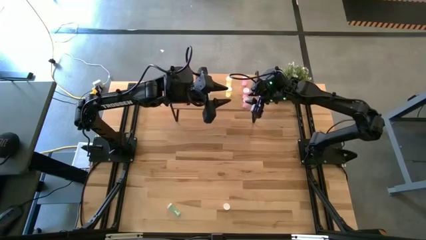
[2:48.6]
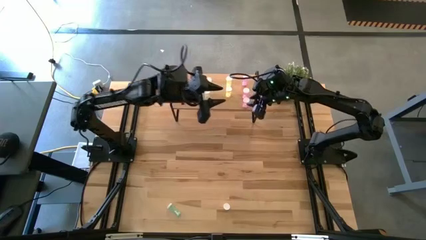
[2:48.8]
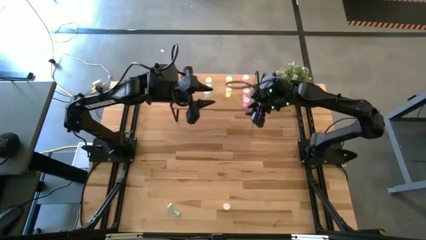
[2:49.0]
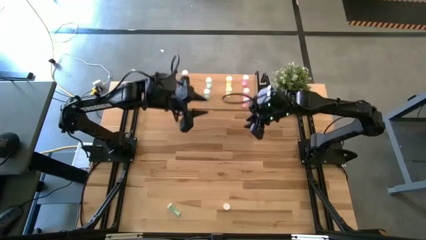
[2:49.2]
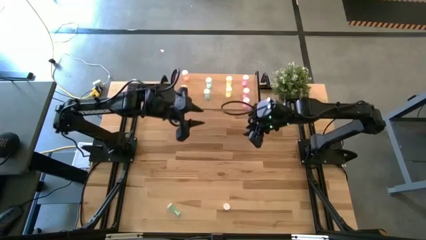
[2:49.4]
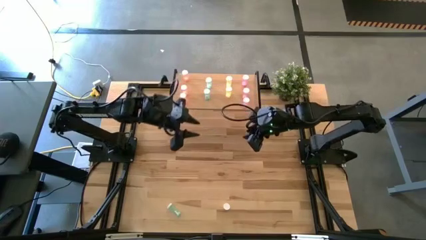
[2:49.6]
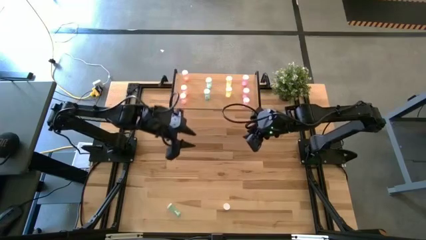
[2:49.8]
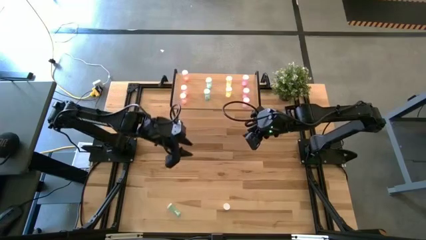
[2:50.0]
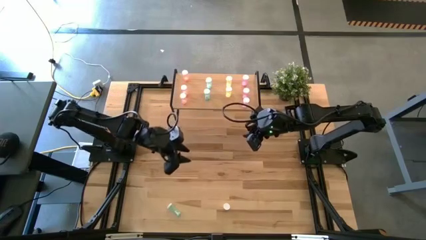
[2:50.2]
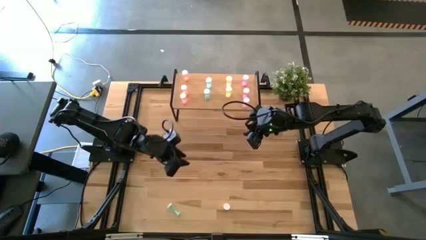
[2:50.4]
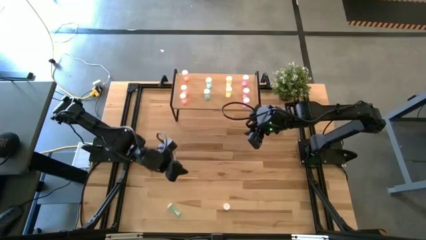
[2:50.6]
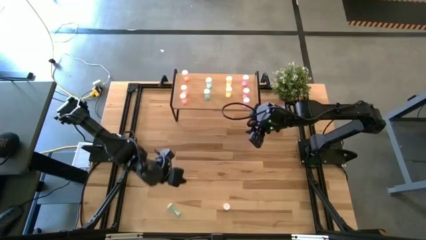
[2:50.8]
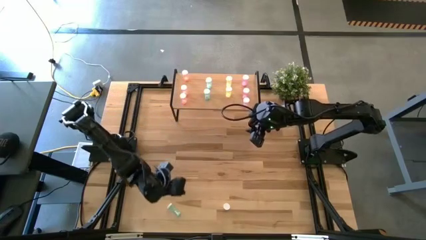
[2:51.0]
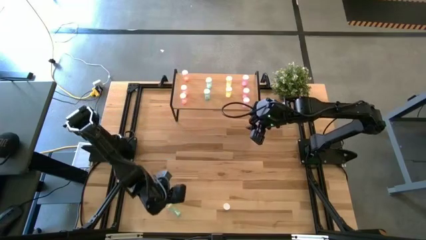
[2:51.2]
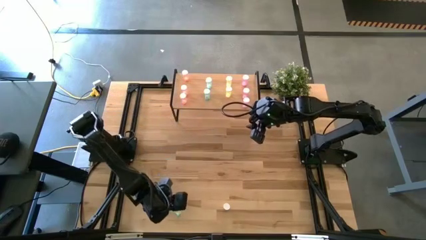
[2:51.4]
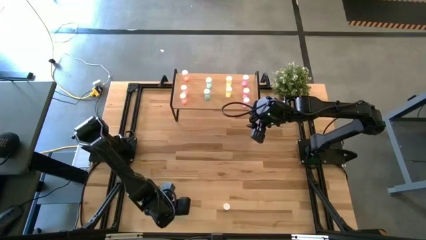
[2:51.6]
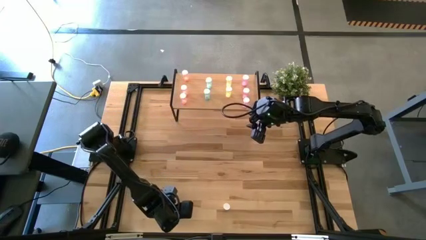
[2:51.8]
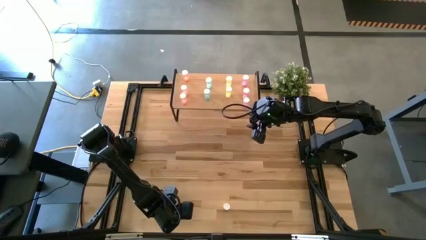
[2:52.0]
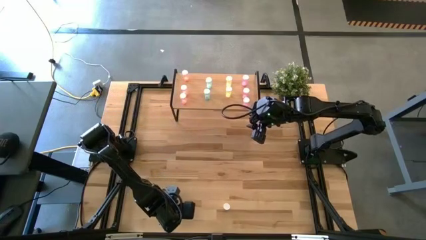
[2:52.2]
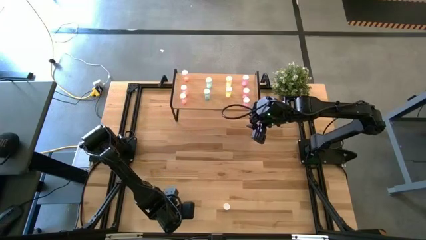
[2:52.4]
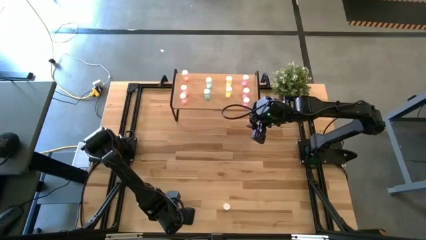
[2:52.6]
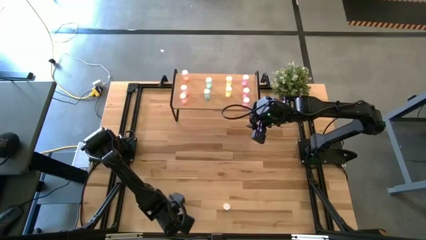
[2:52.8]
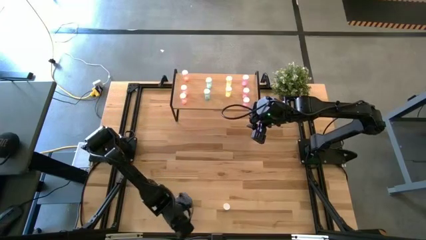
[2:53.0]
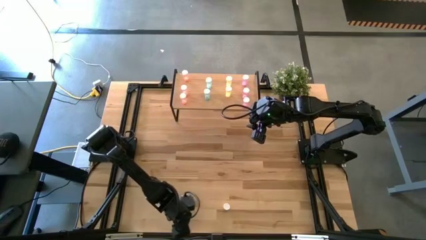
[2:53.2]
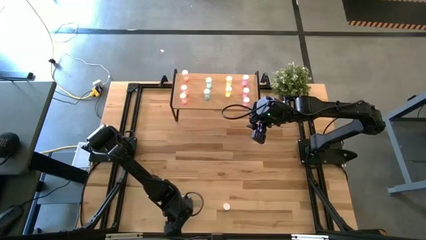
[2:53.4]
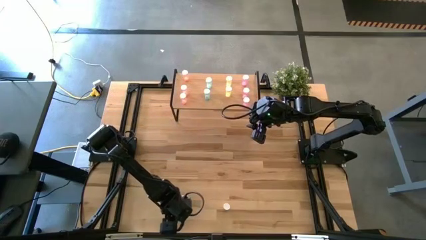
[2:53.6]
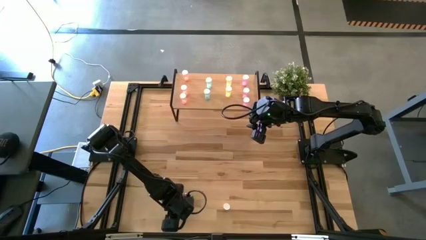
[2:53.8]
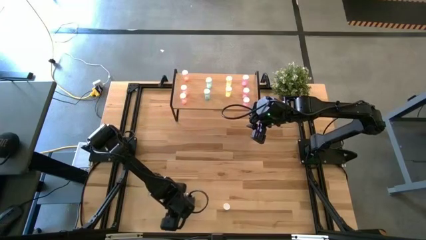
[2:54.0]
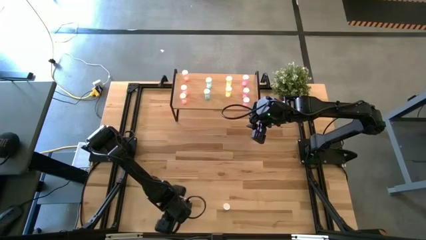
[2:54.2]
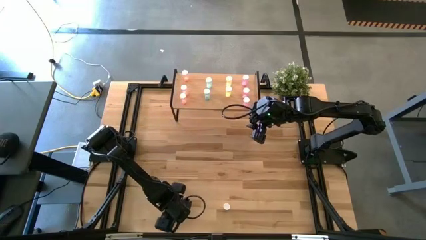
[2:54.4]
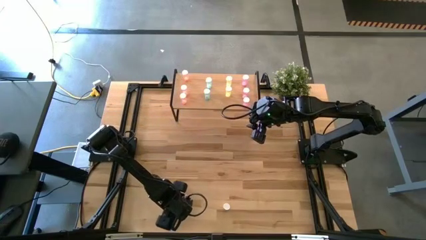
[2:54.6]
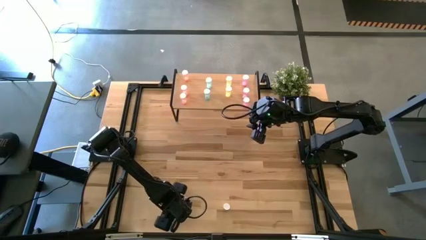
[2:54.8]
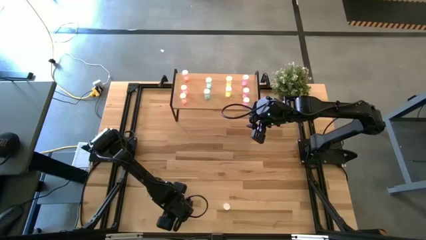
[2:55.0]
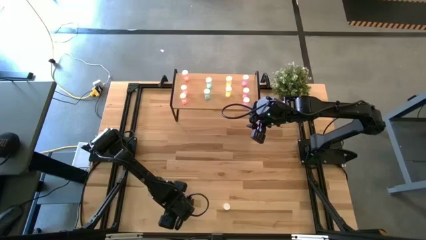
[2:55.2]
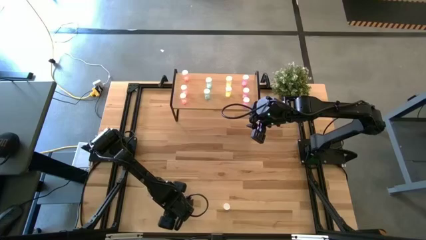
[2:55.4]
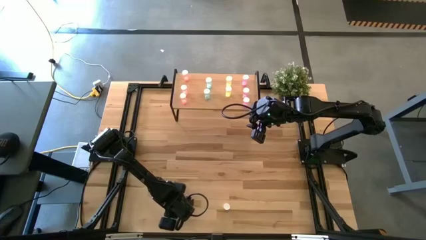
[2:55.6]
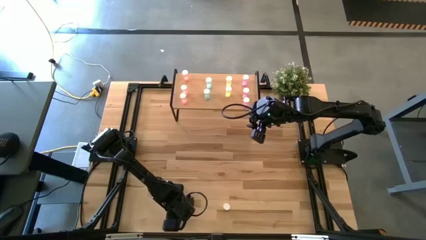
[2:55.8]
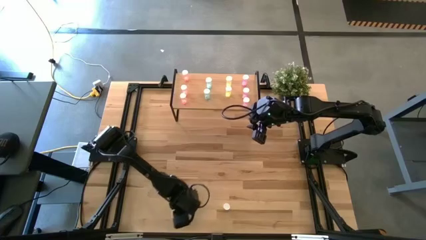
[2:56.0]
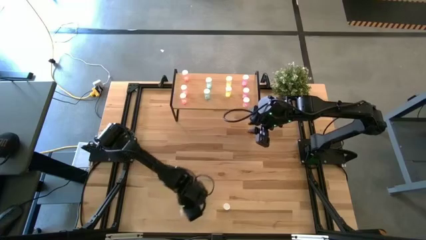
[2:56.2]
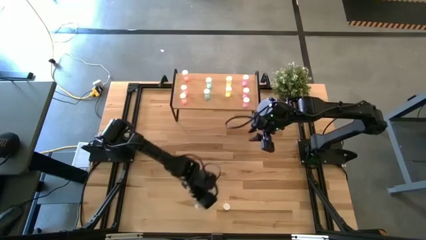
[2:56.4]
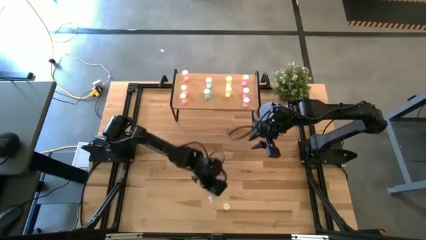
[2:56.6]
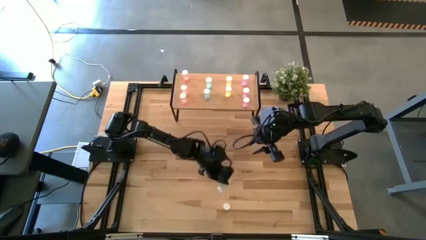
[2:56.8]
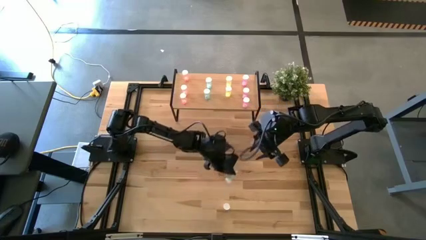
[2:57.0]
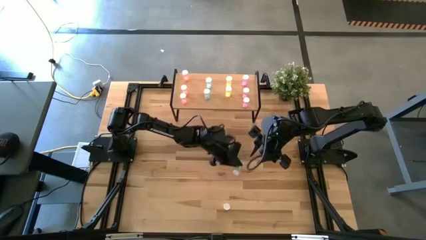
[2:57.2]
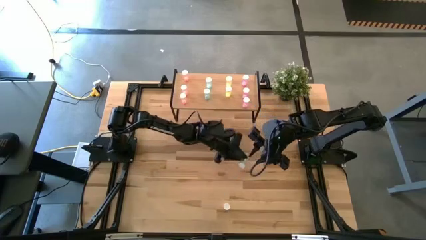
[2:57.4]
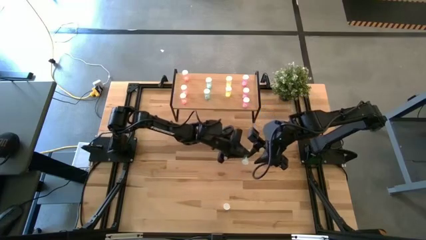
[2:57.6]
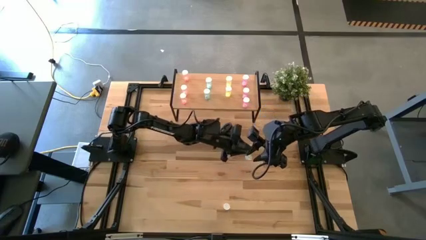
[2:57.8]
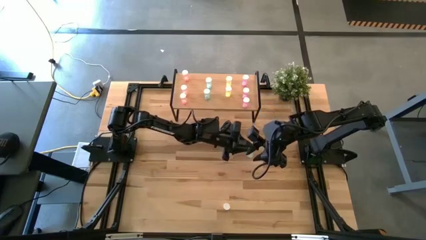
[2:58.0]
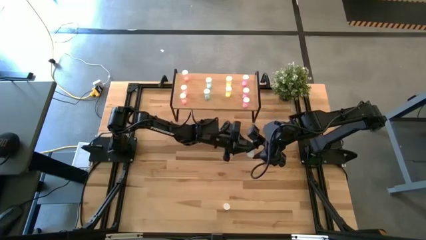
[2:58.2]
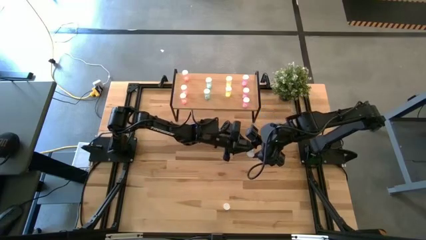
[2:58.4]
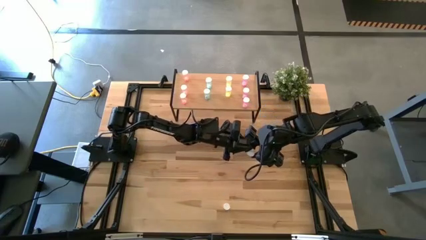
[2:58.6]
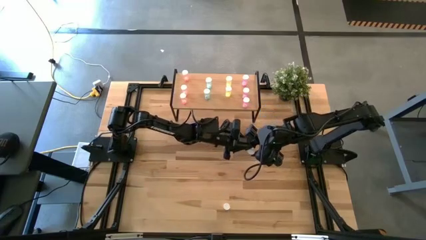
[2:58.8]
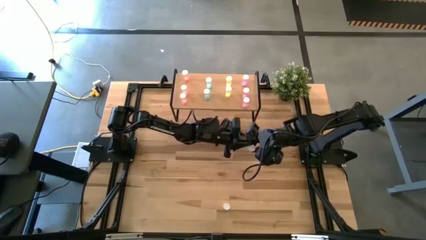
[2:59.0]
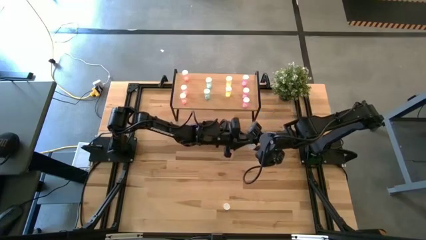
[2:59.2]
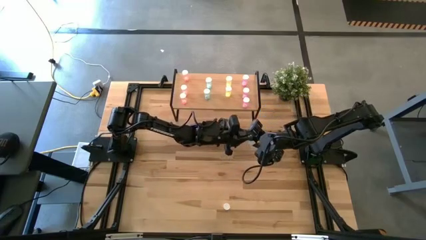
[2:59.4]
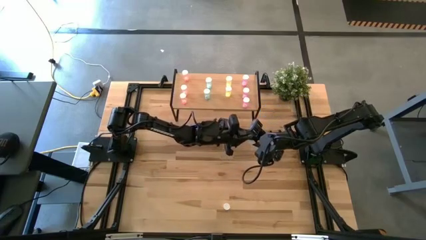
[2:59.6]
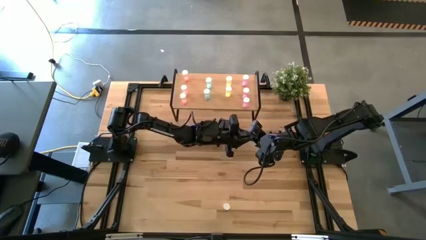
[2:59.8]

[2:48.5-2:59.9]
Task: Pick and place medicine bottles onto shelf by color
Put the blue pill bottle on the shelf aligned with the other blue pill bottle
